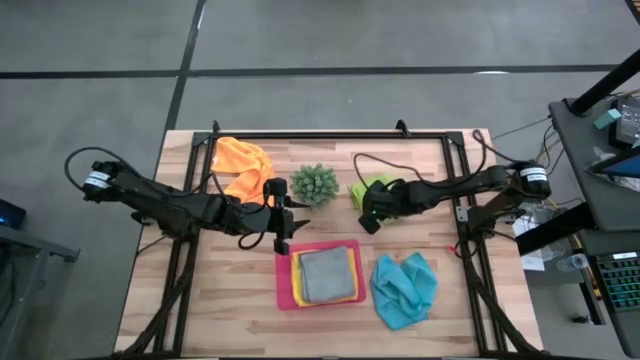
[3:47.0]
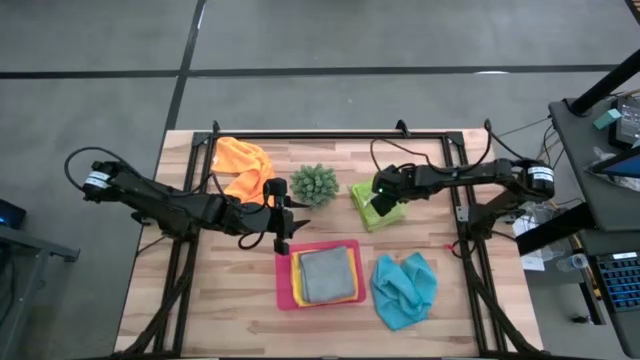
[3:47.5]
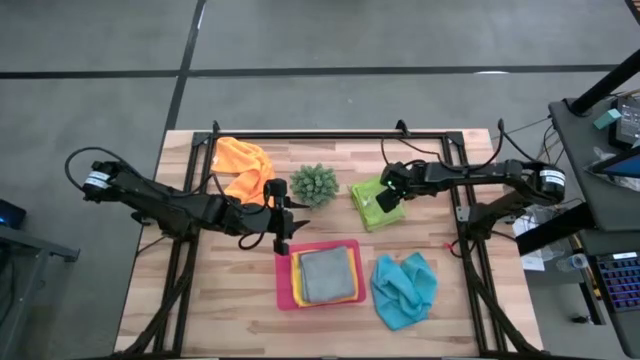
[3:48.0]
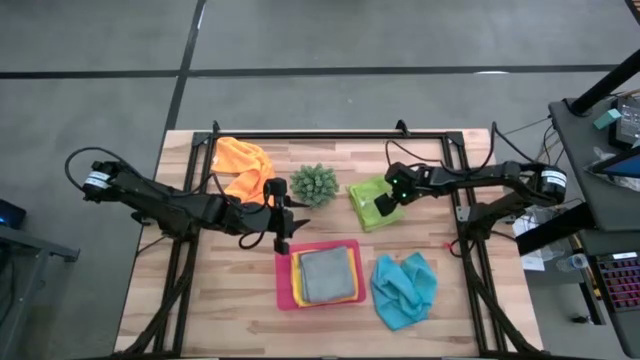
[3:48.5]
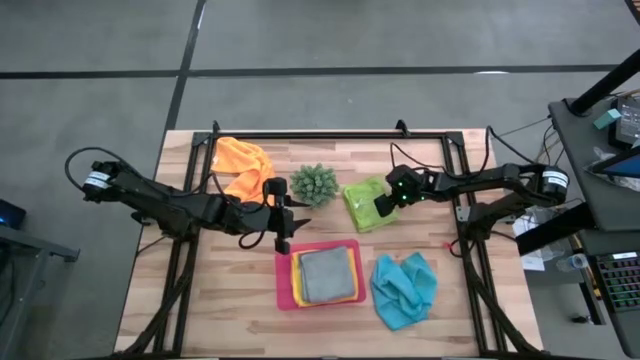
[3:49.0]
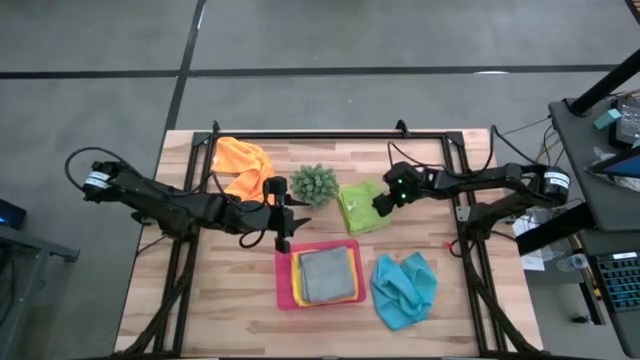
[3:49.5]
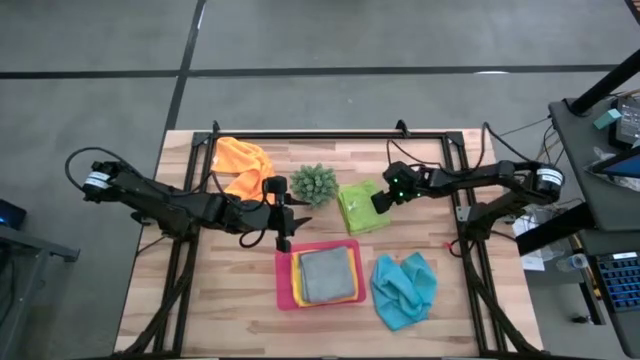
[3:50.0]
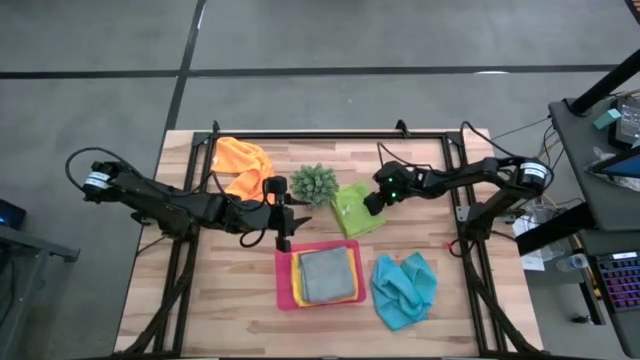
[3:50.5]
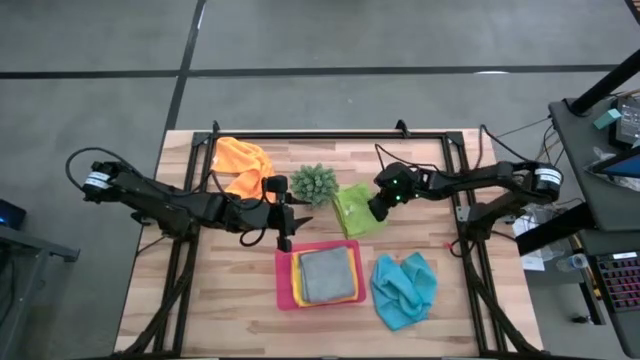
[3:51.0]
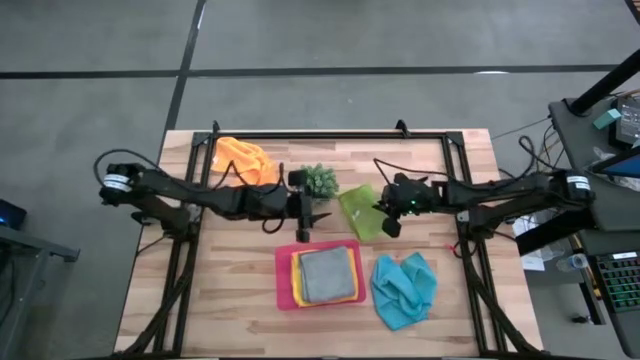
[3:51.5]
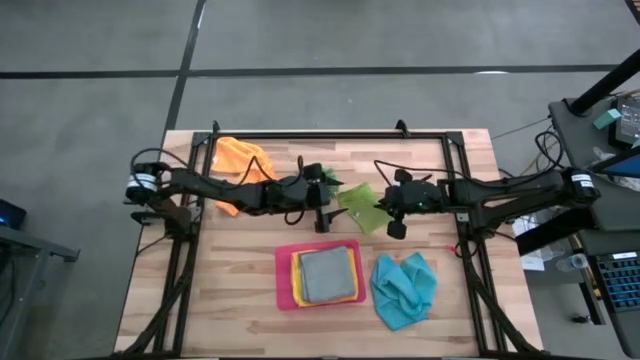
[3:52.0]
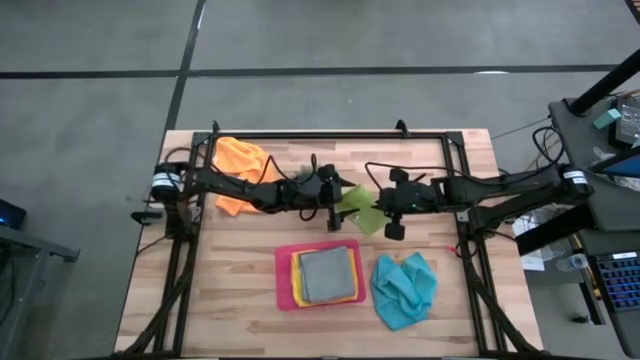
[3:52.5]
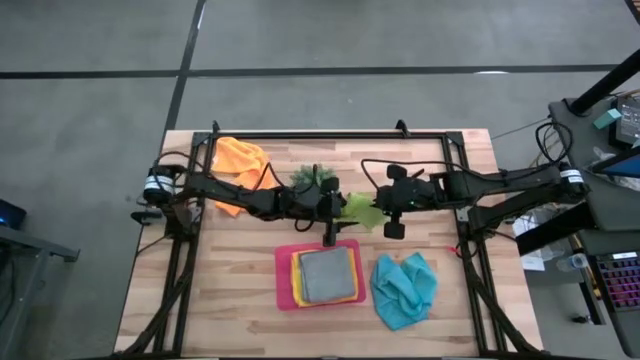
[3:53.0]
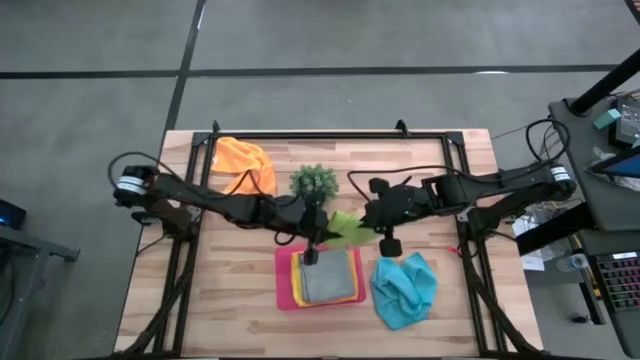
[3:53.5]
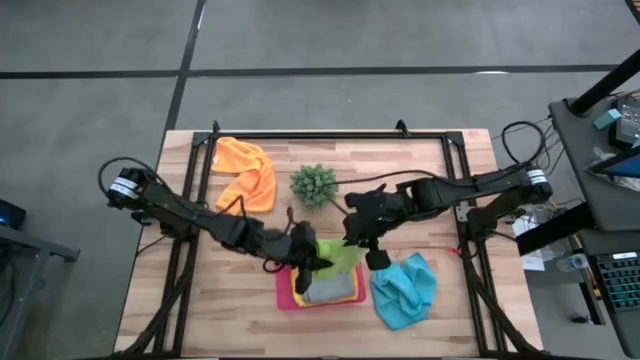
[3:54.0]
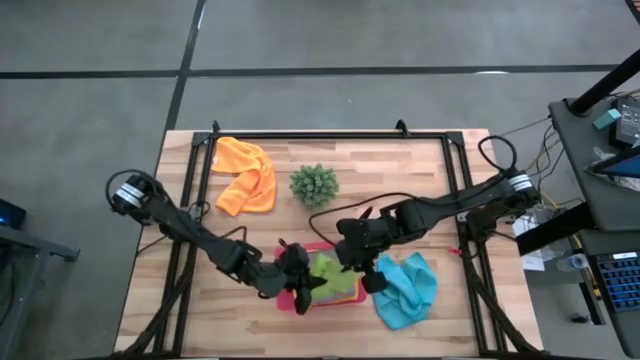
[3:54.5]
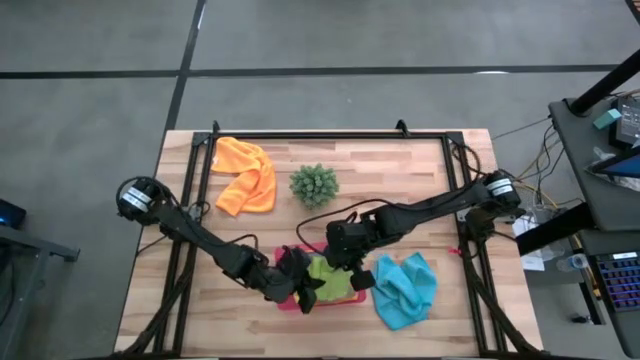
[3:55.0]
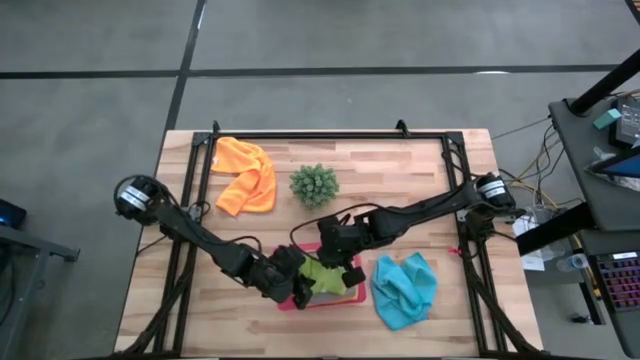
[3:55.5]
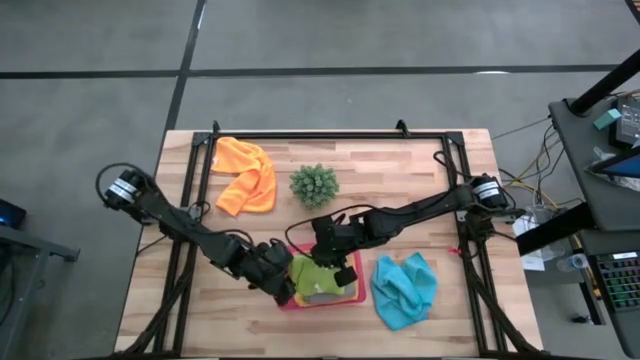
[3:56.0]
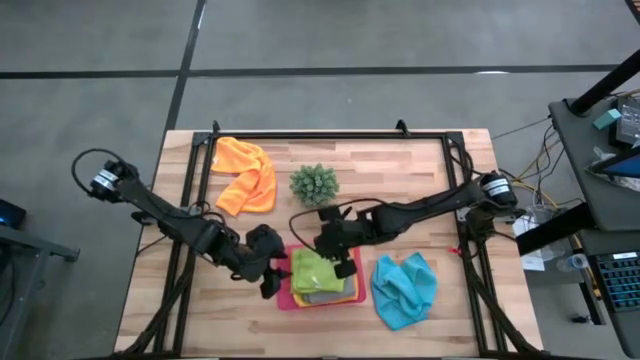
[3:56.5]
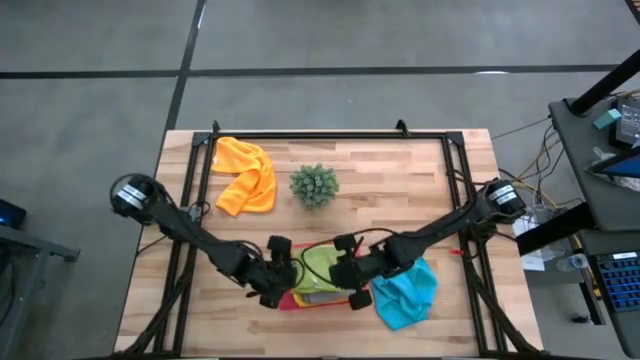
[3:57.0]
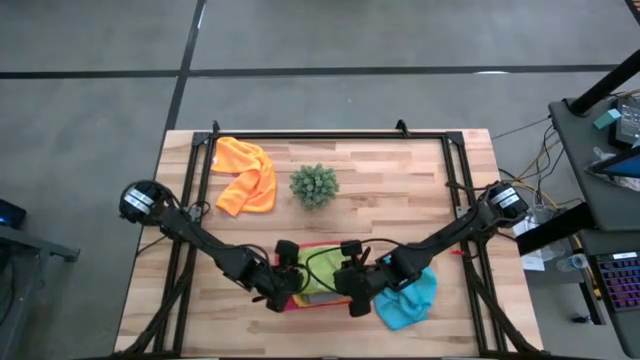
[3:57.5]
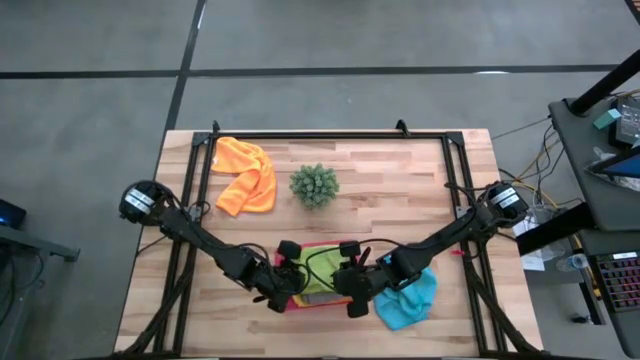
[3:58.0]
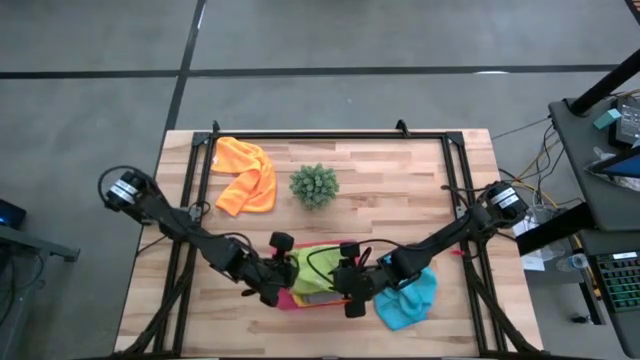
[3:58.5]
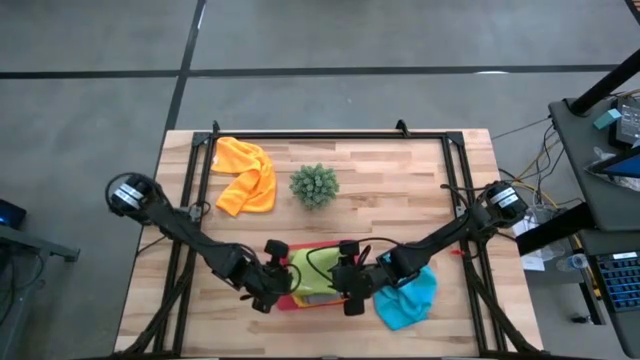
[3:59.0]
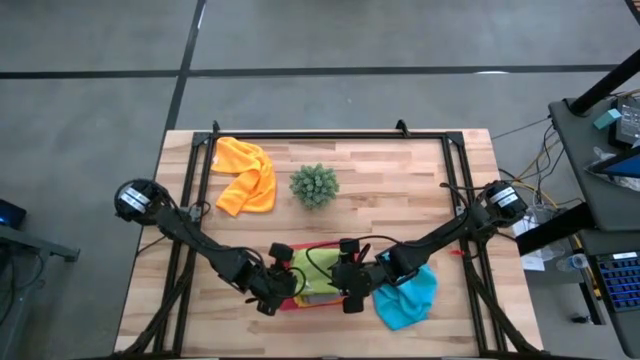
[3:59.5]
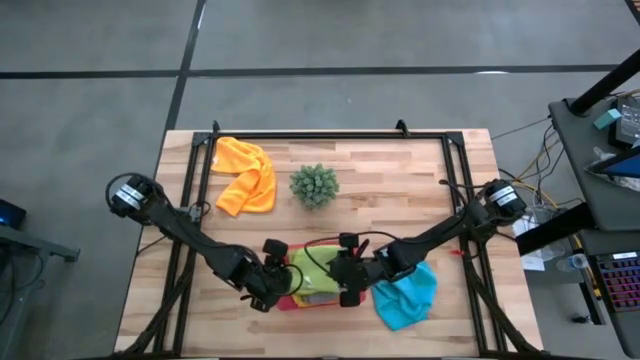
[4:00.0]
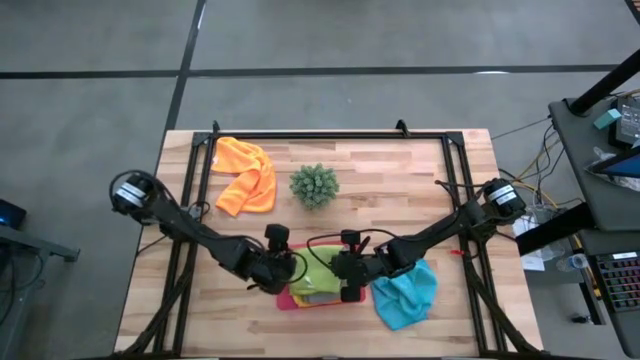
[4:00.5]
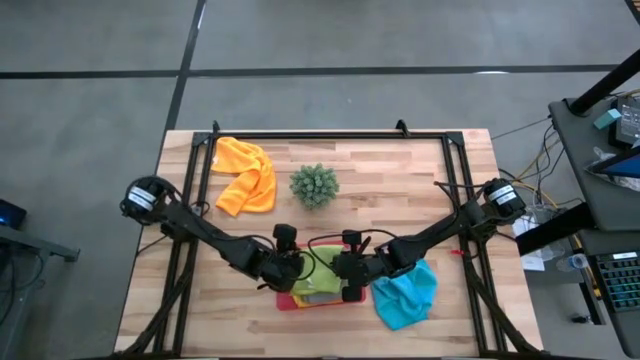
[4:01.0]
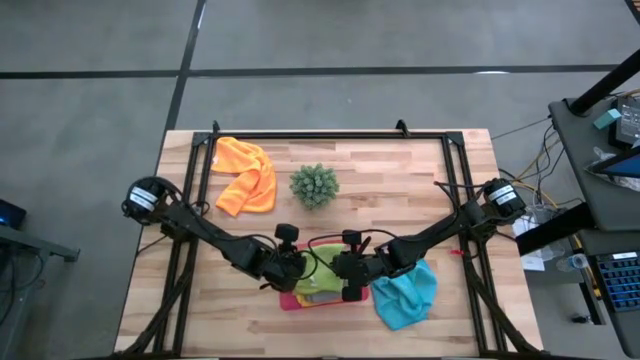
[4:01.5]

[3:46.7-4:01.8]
Task: Fold microfiber towels
Put the green microfiber cloth into the pink bin

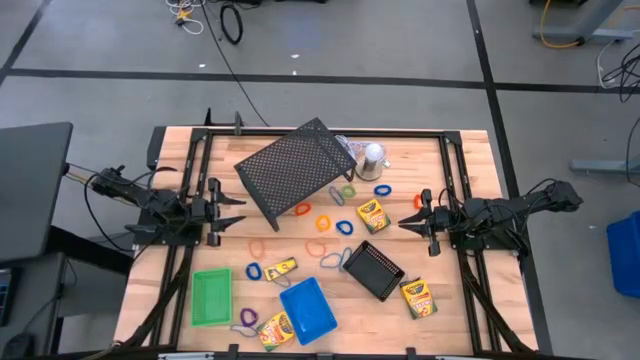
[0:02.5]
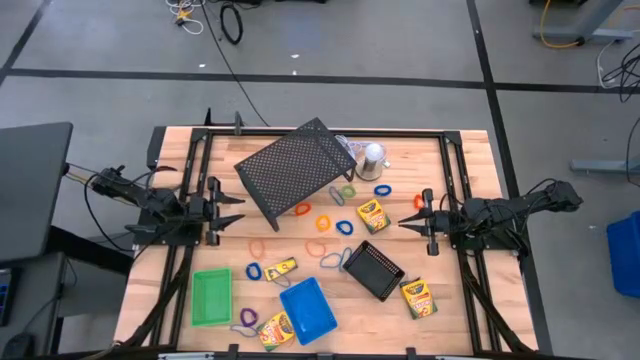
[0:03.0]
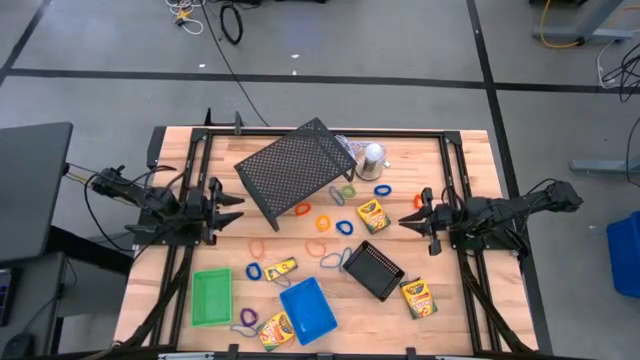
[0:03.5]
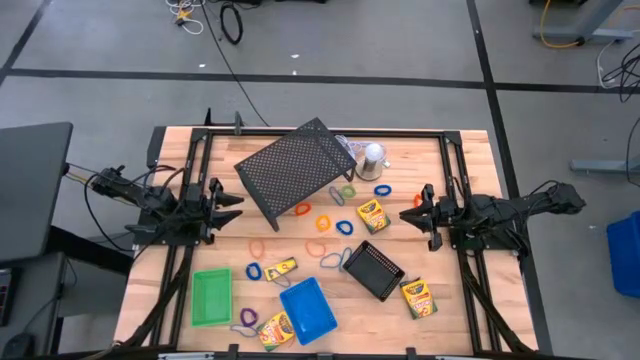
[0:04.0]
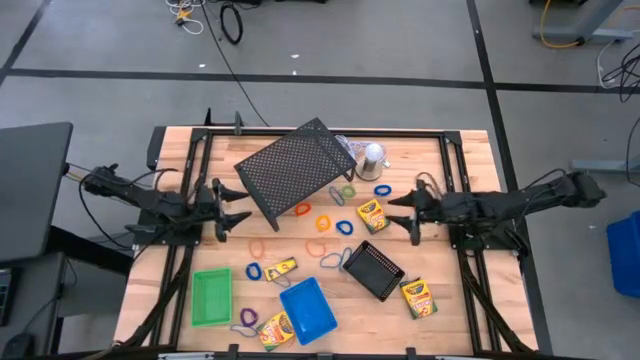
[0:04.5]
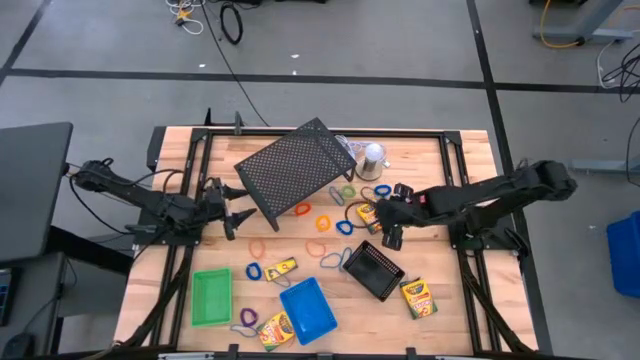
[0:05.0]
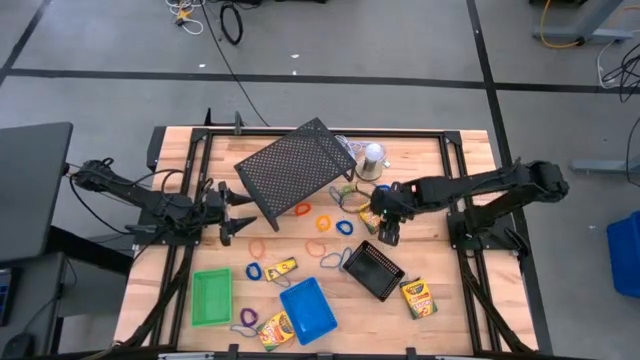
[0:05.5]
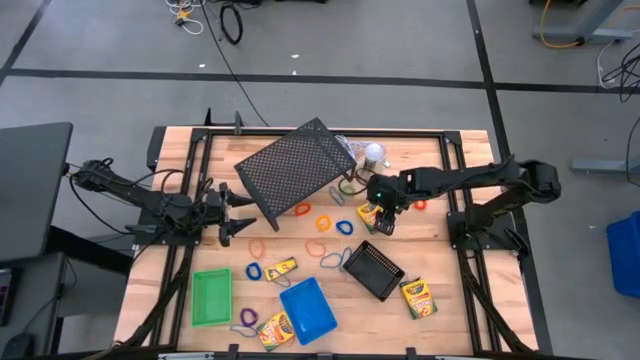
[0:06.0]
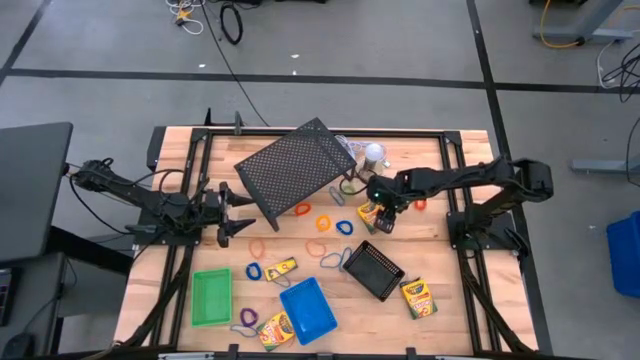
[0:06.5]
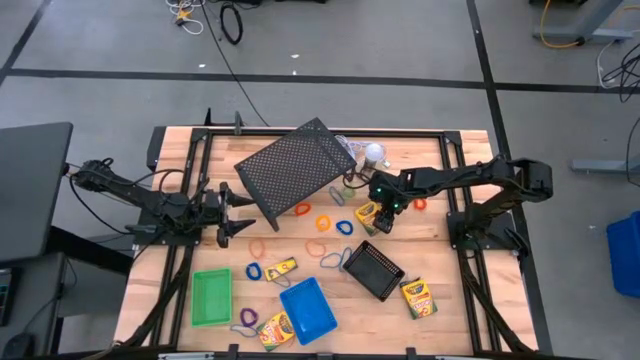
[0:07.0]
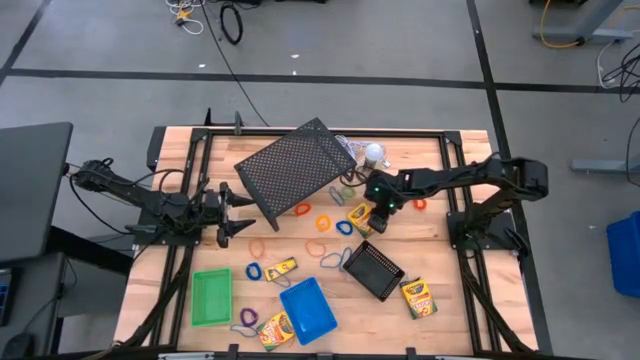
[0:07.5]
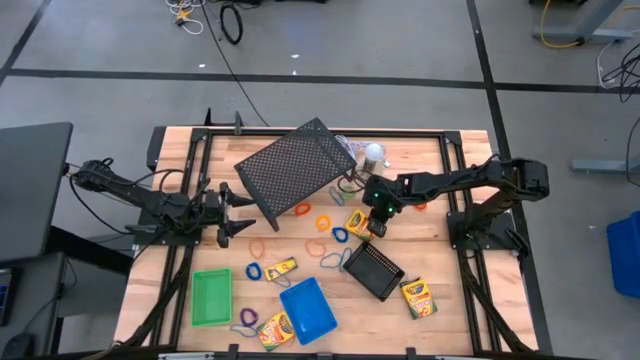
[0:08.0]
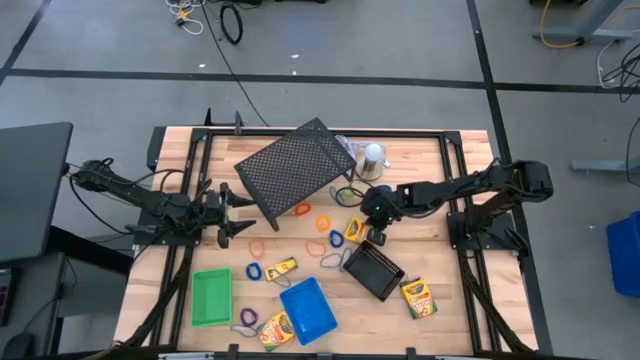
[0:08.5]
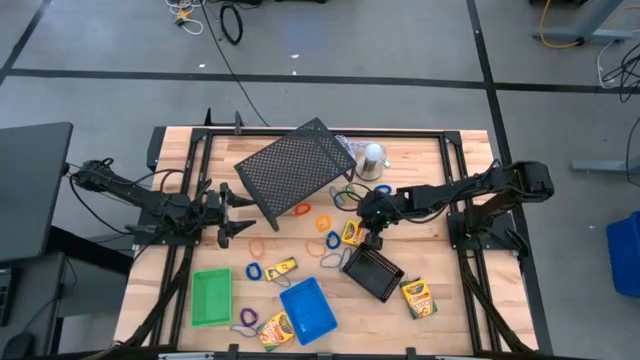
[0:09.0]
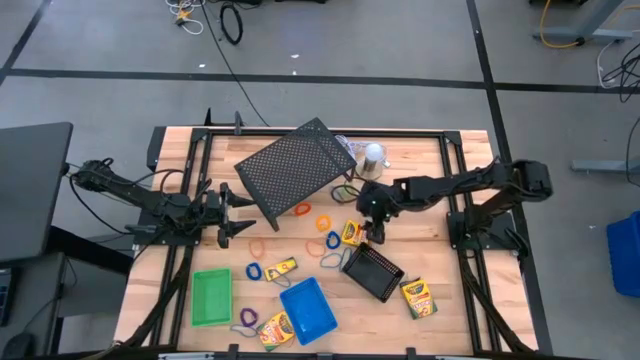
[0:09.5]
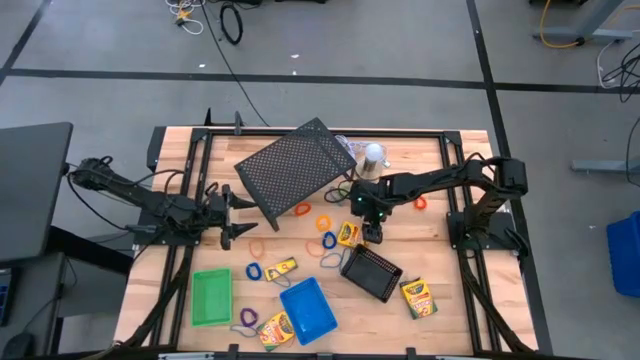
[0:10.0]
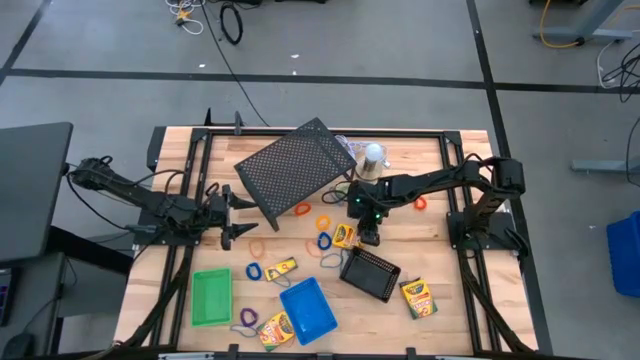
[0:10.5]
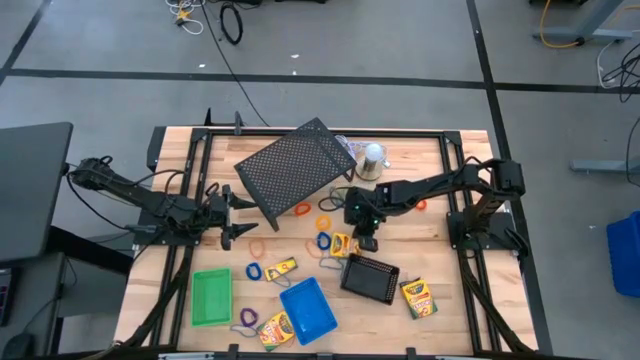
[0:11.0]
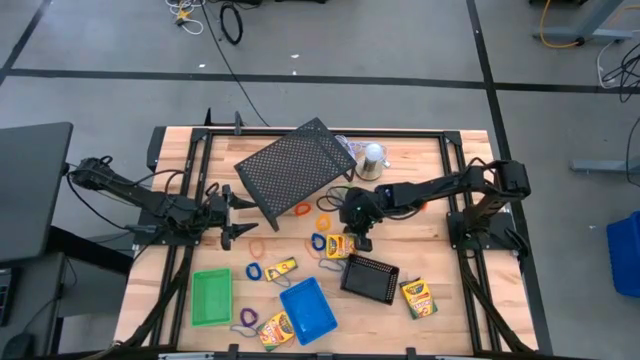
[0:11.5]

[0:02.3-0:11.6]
Task: Pick & Place Office Desk Supplies
Put the yellow crayon box into the blue bin
